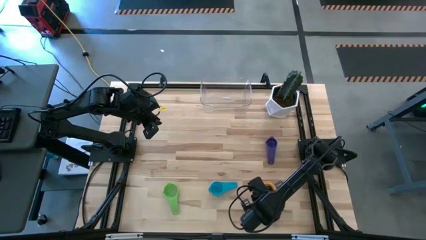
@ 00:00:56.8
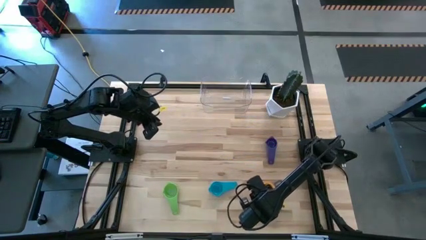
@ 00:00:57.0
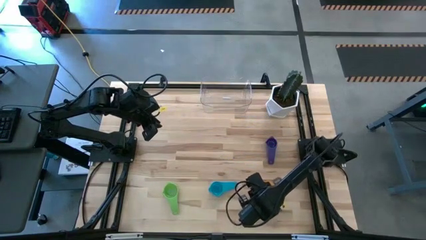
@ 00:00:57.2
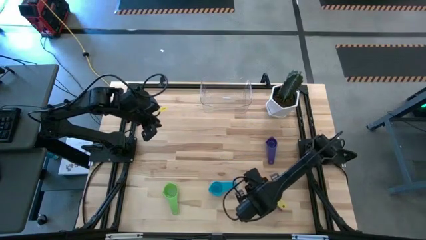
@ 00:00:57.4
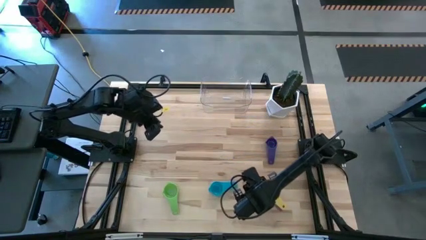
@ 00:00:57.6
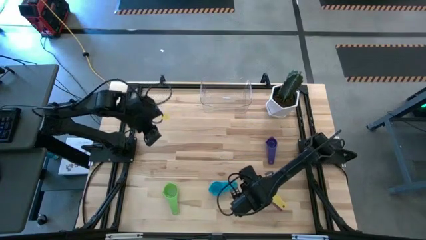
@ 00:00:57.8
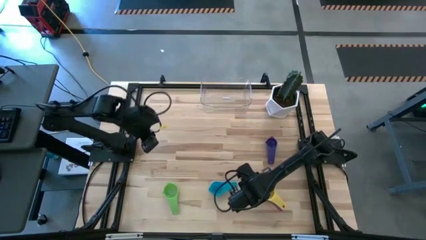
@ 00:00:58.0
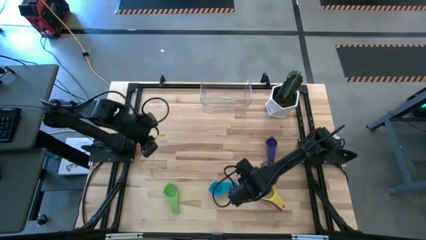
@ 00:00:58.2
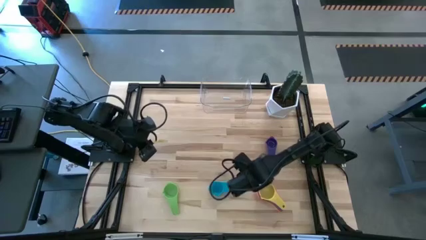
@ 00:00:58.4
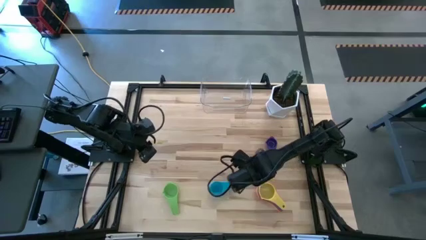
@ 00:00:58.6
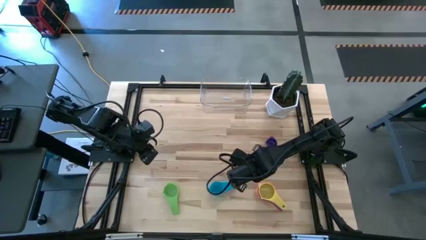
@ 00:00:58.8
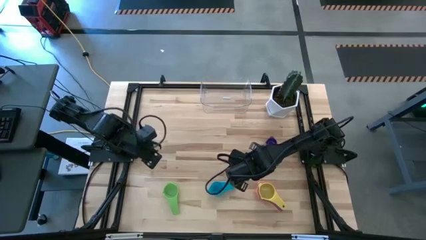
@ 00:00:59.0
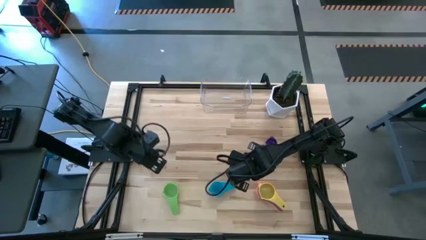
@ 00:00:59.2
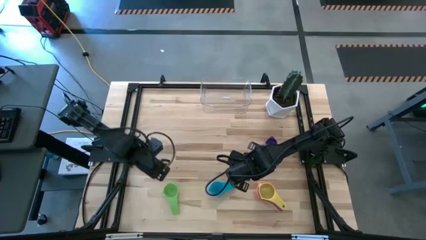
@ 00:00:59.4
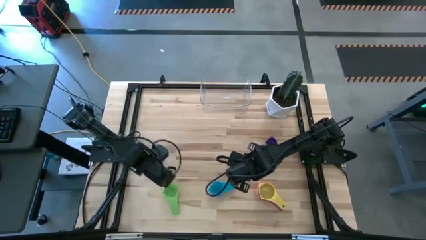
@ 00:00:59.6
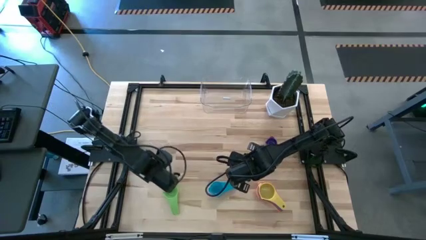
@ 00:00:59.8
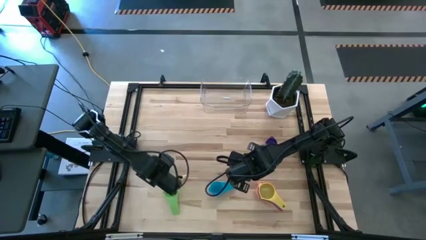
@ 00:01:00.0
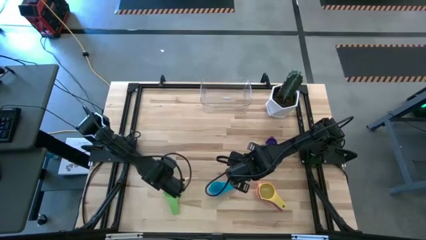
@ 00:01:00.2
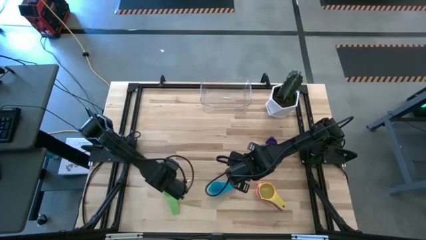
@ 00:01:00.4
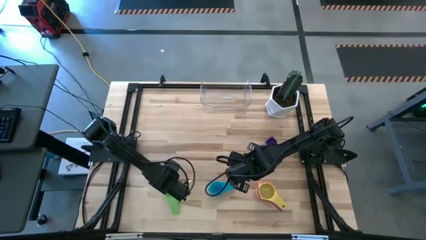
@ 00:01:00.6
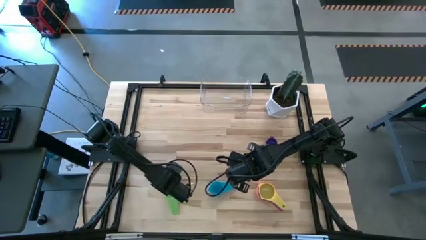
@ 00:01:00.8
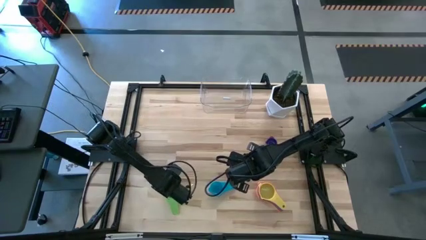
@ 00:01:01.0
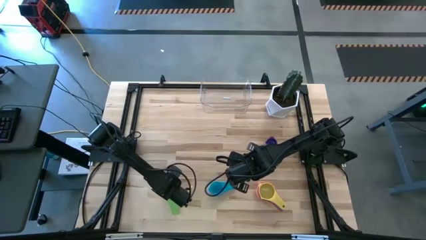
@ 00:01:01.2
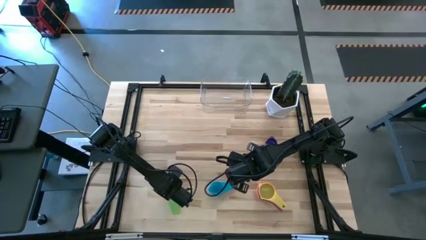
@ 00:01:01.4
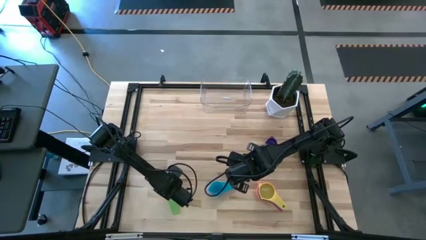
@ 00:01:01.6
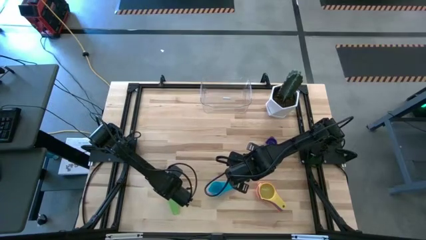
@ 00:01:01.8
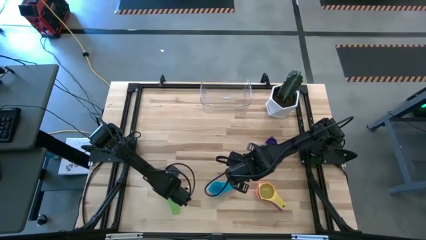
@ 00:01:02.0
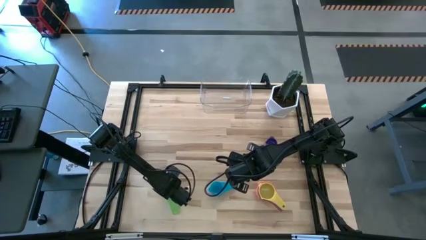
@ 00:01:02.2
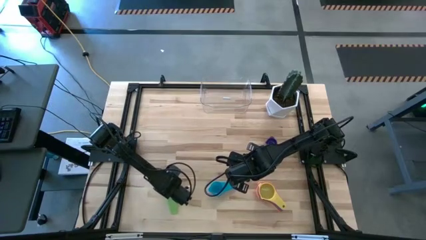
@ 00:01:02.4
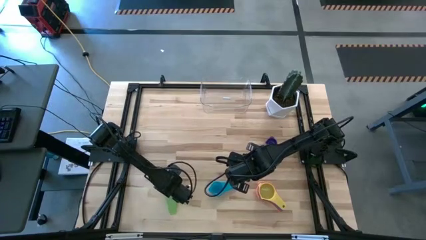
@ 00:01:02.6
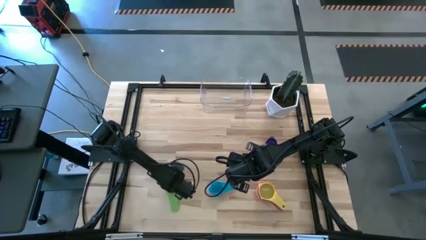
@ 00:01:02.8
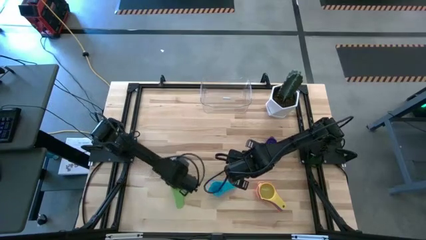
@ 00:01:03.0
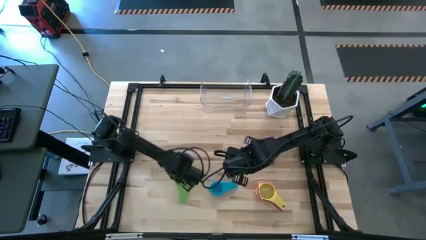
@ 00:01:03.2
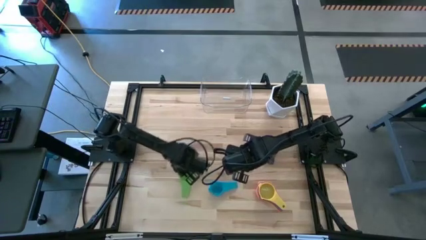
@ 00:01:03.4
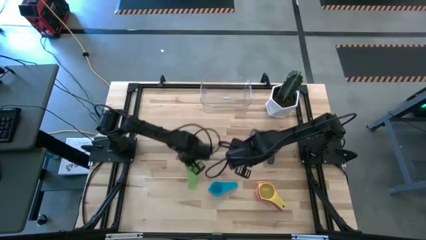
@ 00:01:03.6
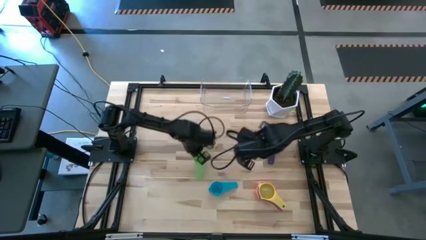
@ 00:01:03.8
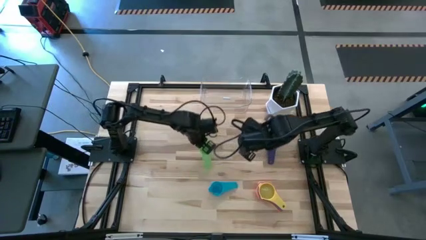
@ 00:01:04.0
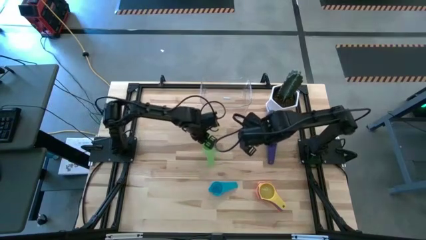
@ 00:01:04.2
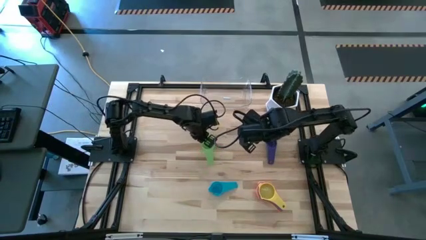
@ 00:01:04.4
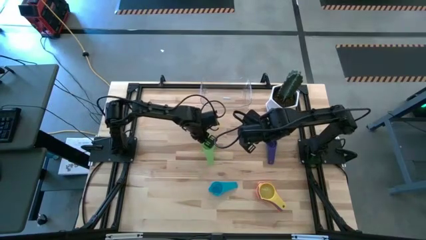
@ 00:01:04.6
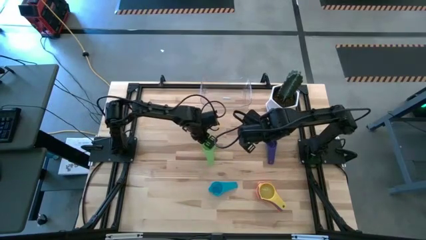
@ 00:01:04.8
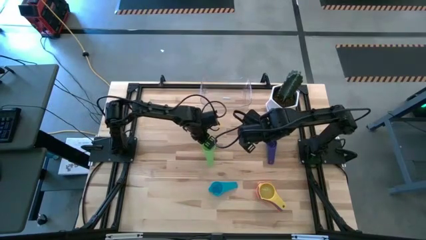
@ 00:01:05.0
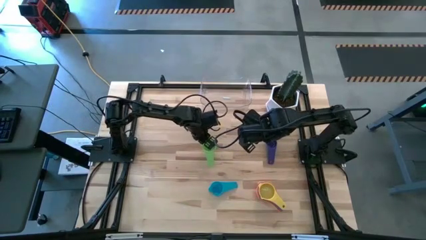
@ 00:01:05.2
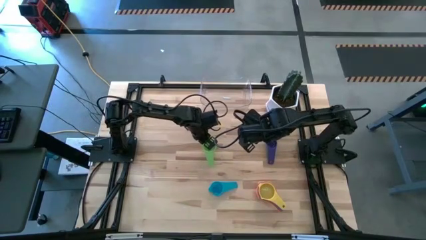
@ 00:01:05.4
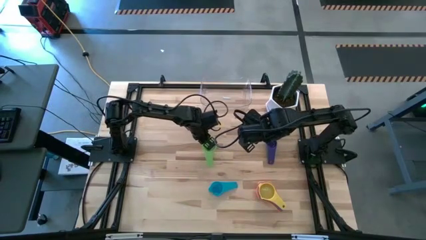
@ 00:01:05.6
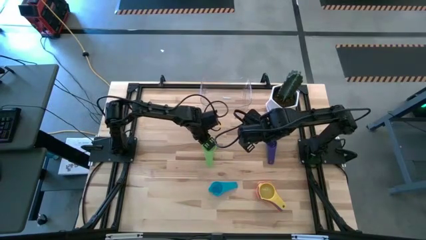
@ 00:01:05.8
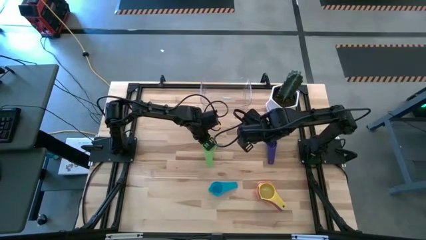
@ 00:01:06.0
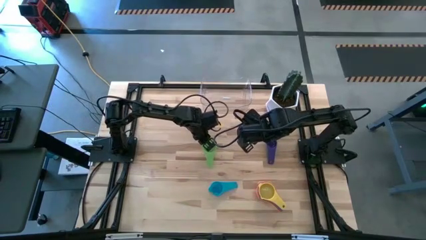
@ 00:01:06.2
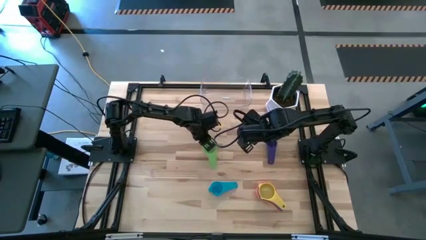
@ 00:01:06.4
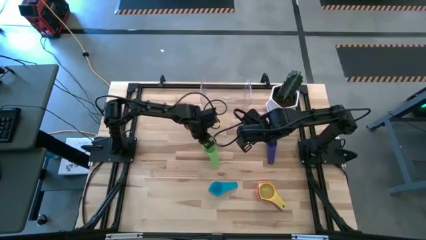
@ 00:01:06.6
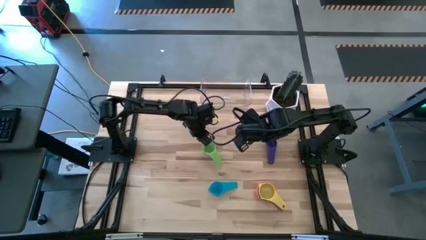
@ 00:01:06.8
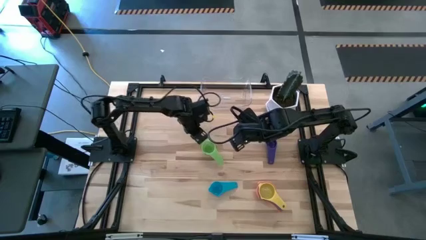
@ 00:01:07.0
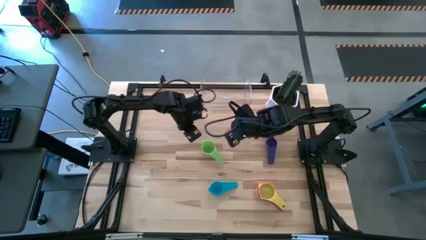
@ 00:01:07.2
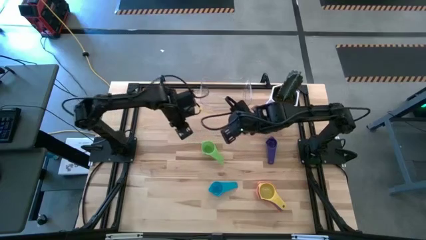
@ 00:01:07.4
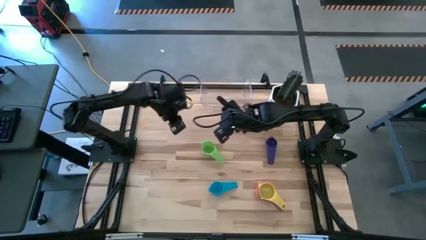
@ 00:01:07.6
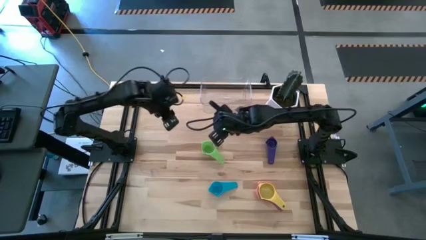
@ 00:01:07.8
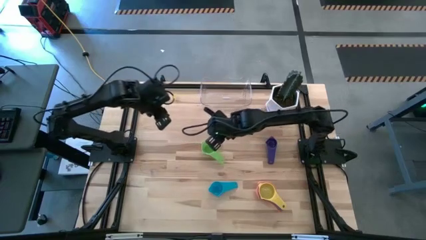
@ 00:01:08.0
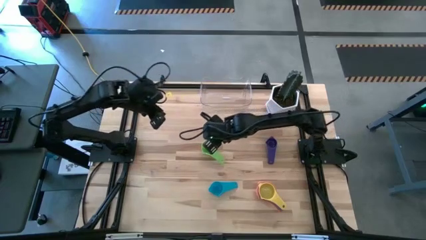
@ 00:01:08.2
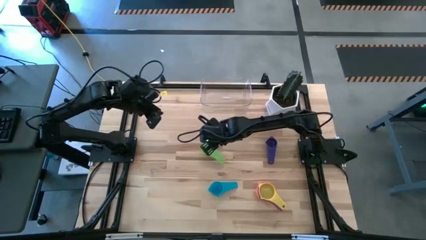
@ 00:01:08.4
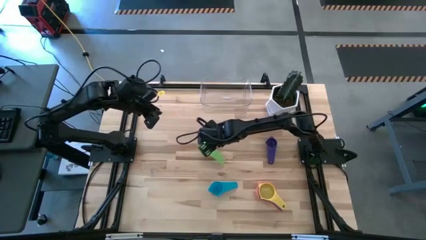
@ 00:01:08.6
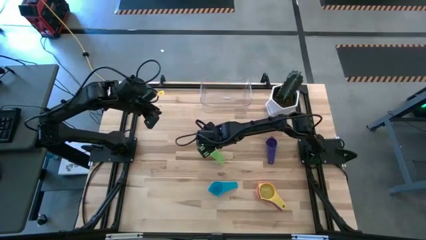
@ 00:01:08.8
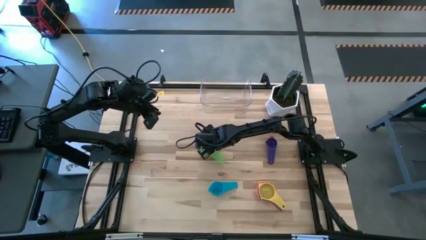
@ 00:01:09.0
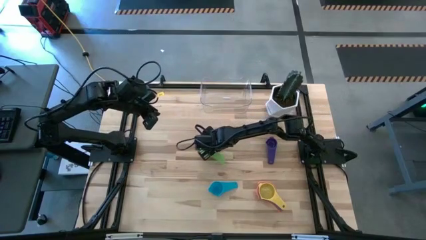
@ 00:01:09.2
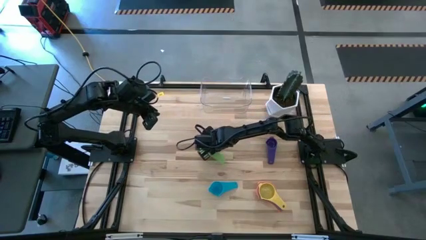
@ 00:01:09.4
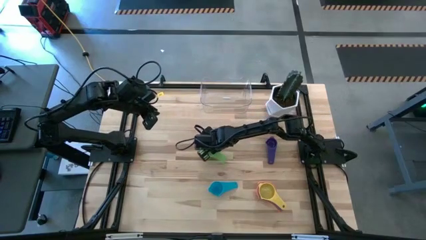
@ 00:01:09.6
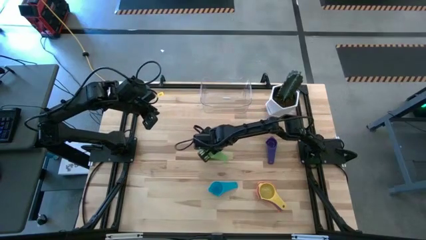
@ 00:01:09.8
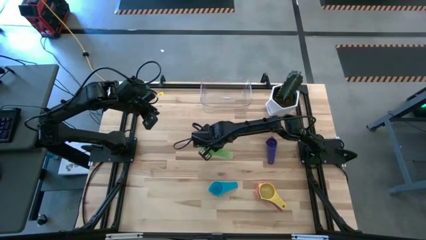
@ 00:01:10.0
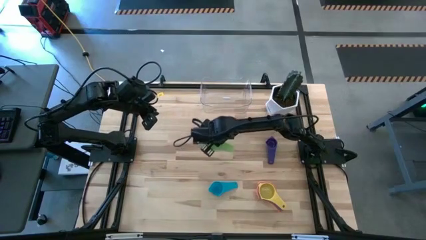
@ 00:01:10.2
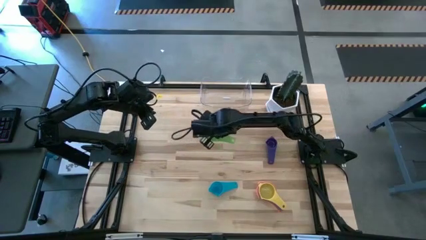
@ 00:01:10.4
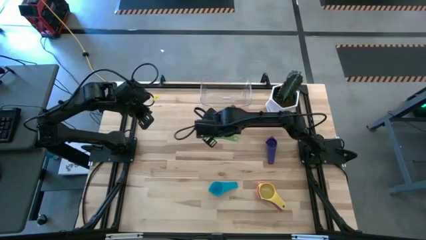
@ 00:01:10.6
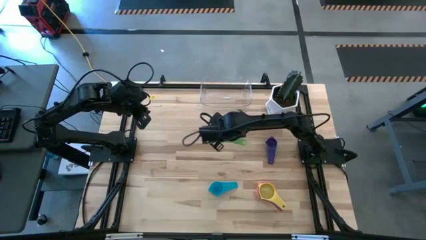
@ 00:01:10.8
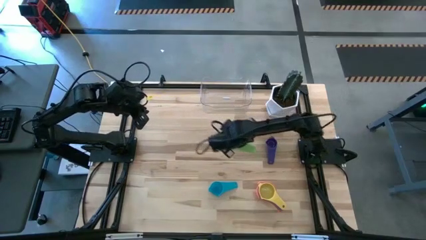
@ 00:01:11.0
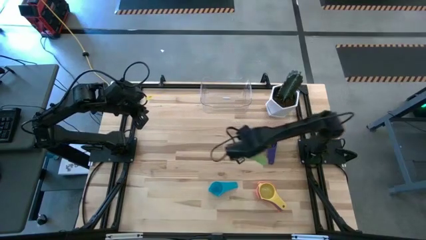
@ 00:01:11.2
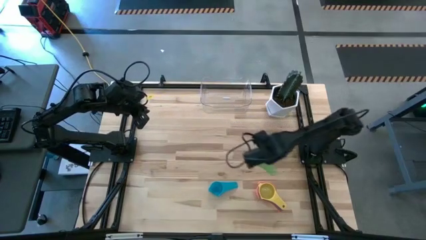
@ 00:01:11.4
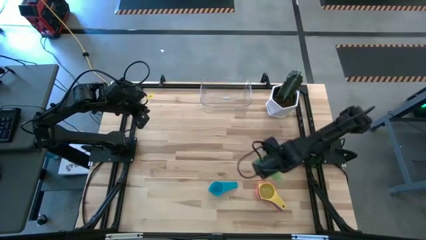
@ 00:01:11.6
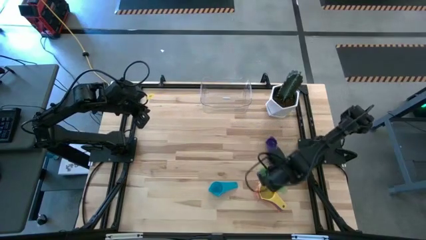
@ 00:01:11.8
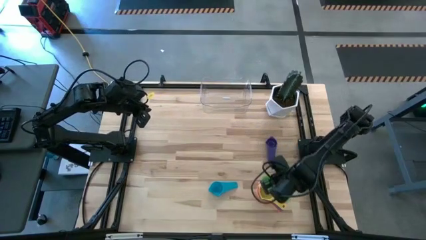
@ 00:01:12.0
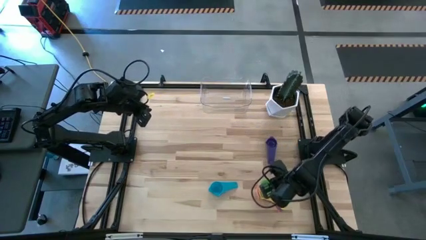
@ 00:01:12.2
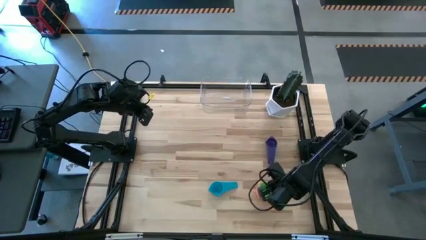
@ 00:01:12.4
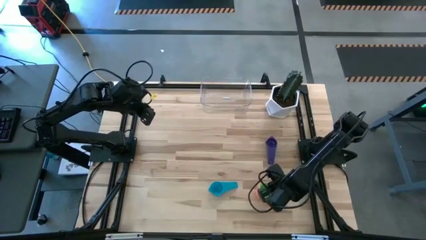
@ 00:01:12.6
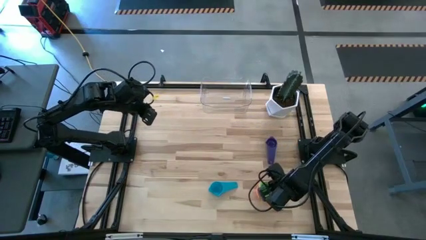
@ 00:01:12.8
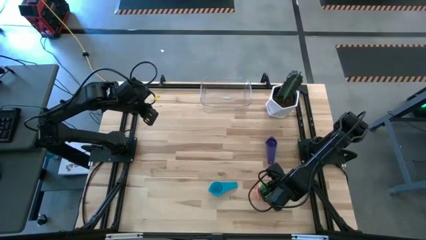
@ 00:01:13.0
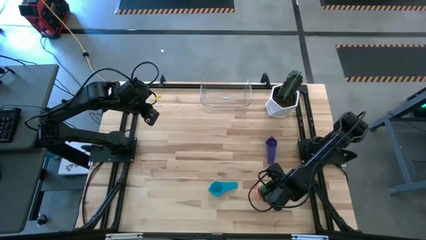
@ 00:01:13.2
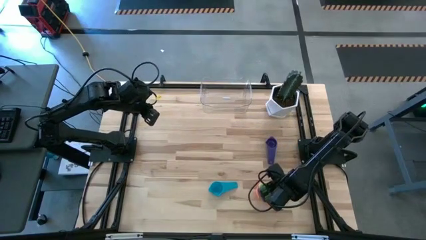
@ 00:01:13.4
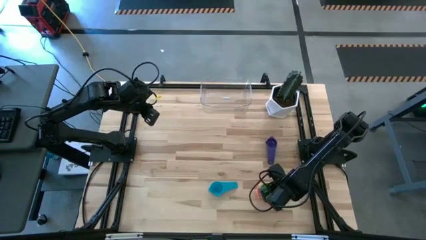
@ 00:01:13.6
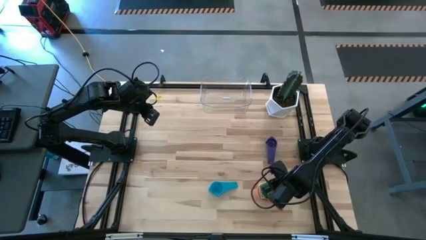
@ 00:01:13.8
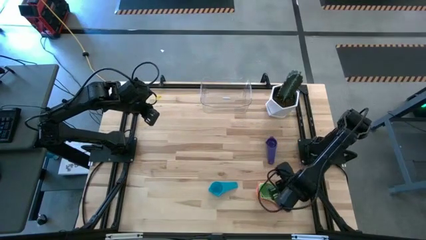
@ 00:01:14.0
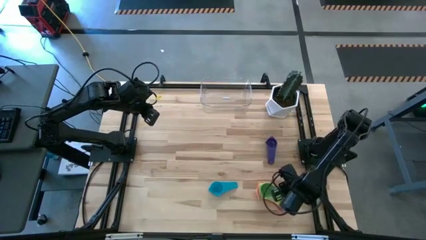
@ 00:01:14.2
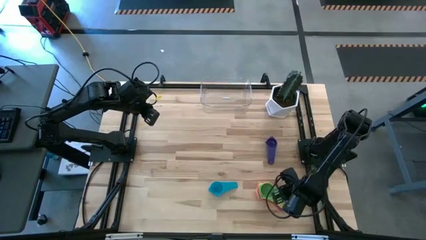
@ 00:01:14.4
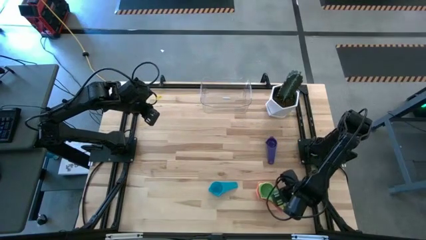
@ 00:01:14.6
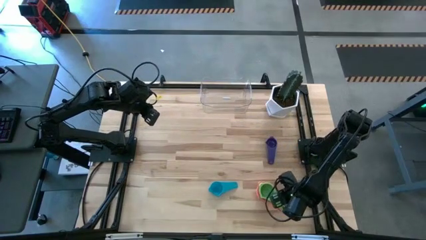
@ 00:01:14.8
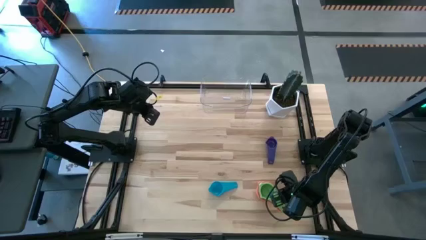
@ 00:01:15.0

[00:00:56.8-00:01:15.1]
Task: Nest measuring cups in basket
Stack the green measuring cup on top of the yellow measuring cup
